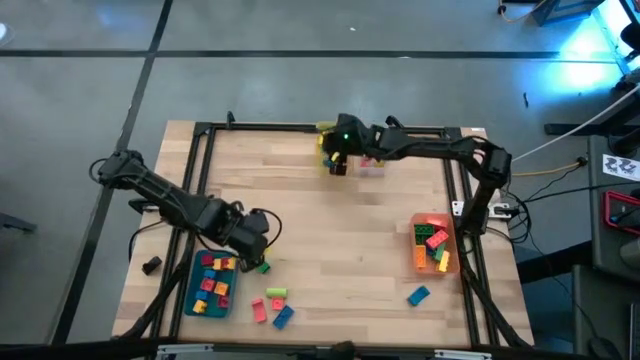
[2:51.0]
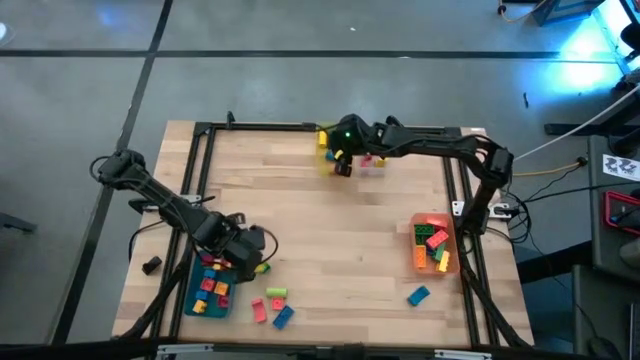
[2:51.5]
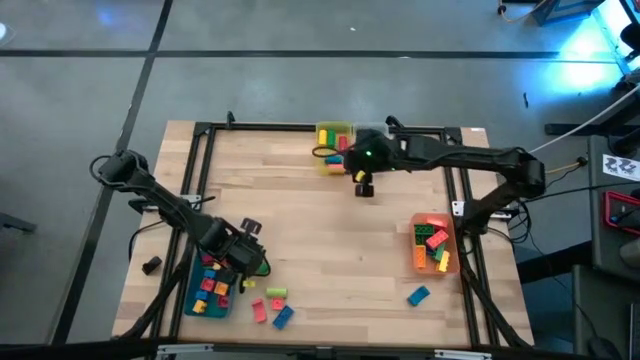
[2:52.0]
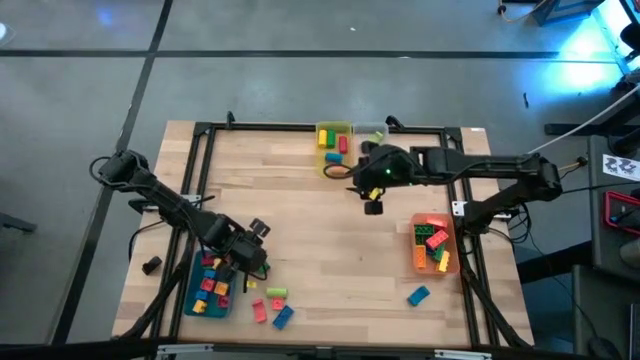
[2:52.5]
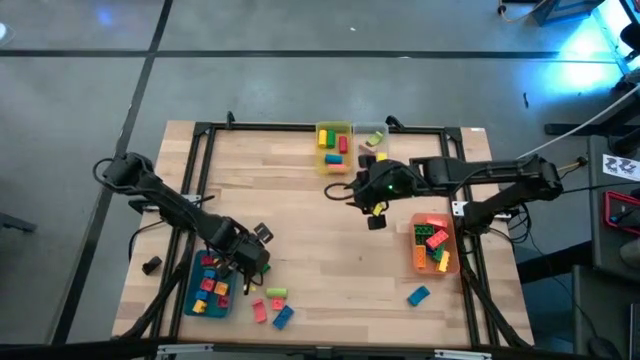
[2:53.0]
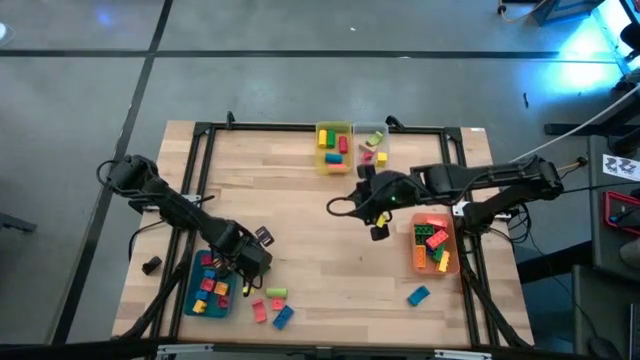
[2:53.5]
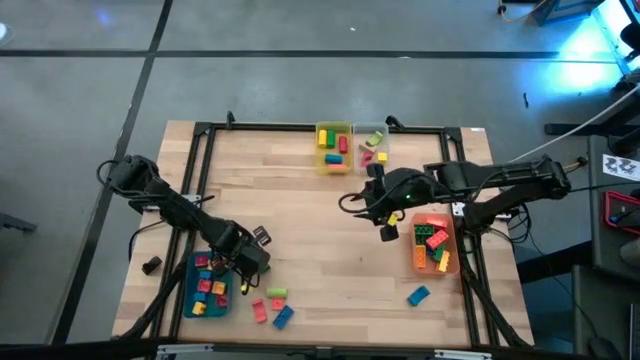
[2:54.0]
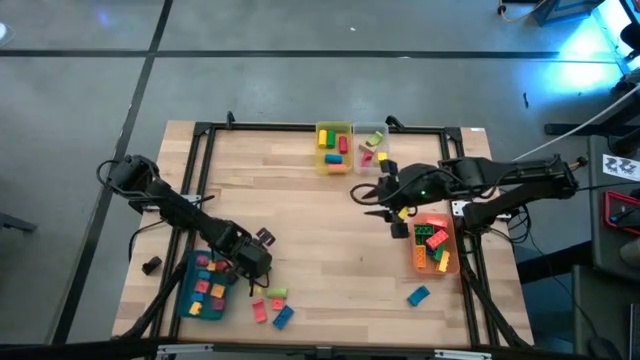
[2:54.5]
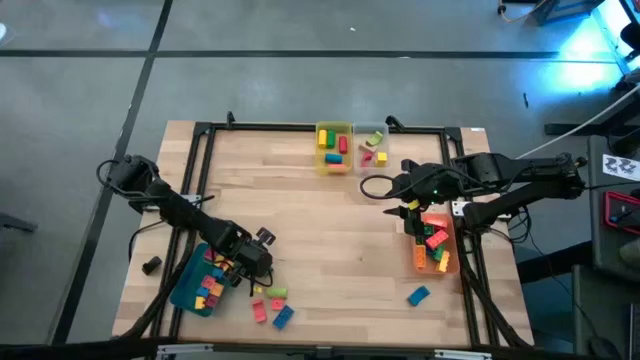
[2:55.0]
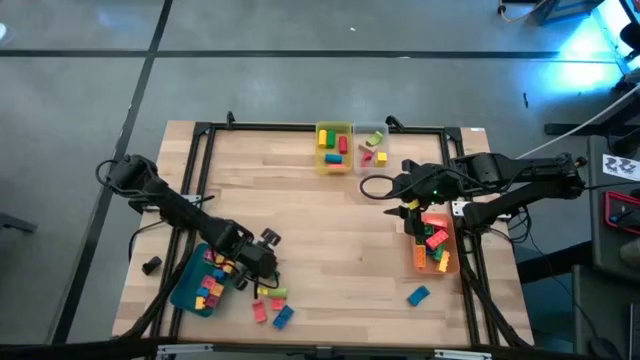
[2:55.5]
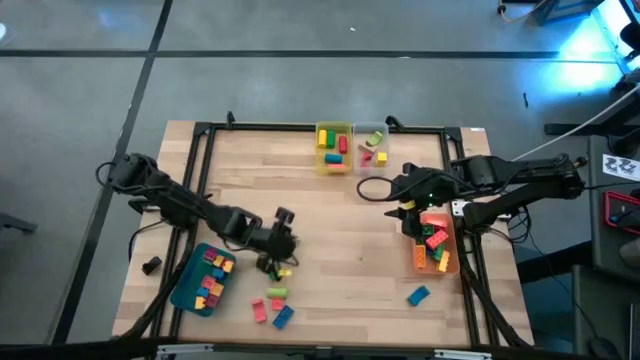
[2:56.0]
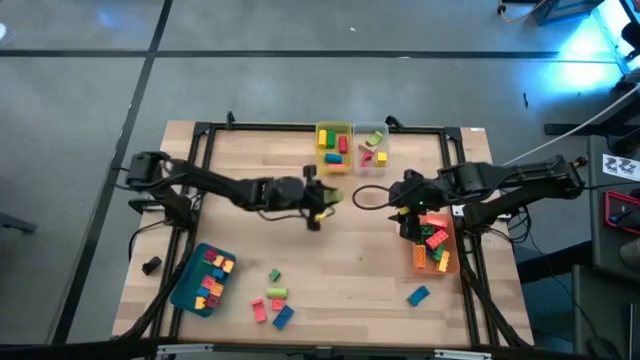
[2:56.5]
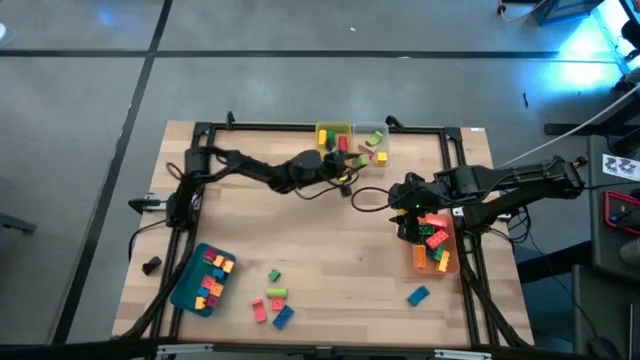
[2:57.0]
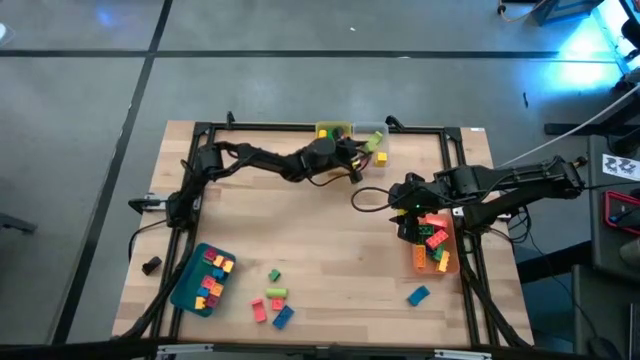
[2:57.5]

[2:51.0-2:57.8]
Task: Sort blocks by size
Put the light green block into the transparent bin

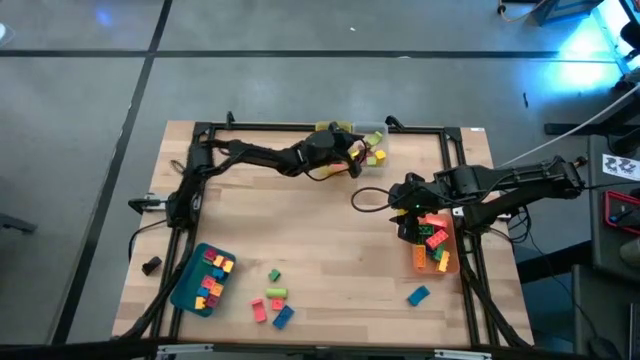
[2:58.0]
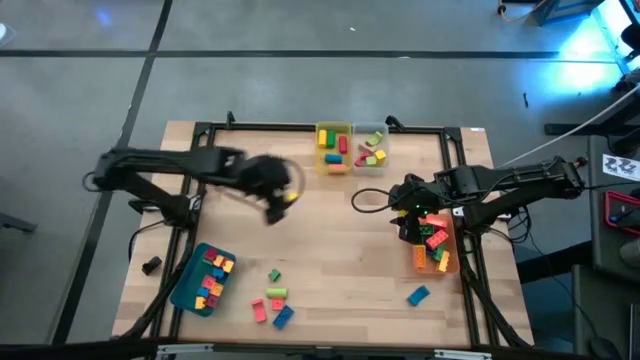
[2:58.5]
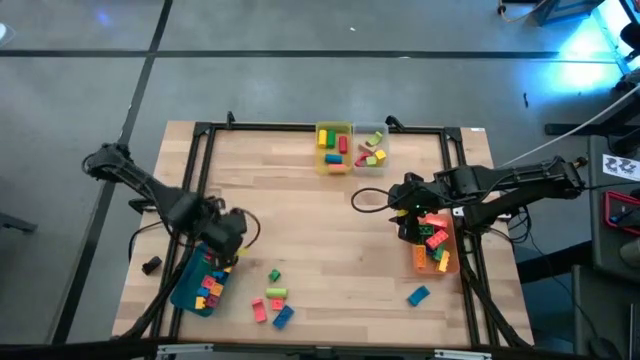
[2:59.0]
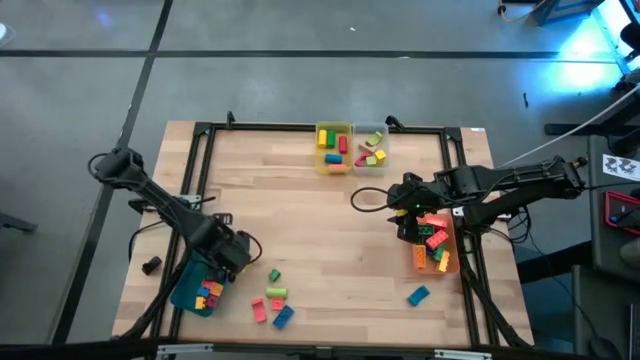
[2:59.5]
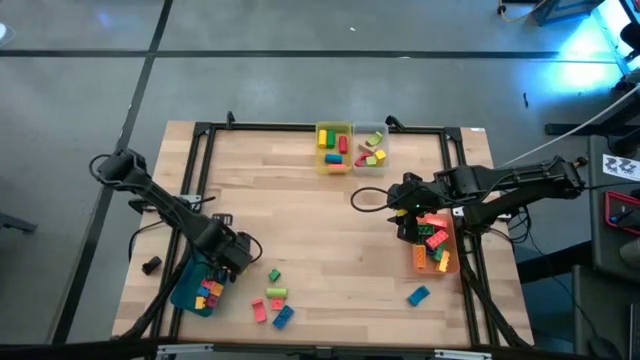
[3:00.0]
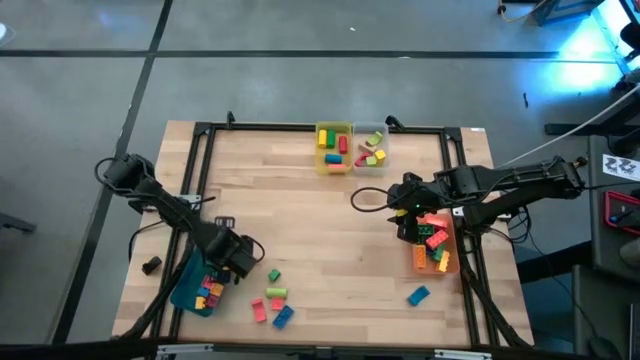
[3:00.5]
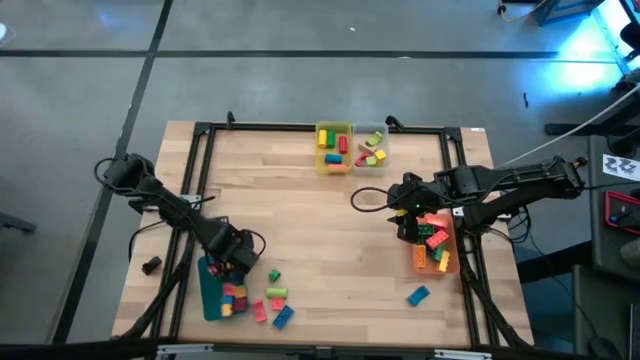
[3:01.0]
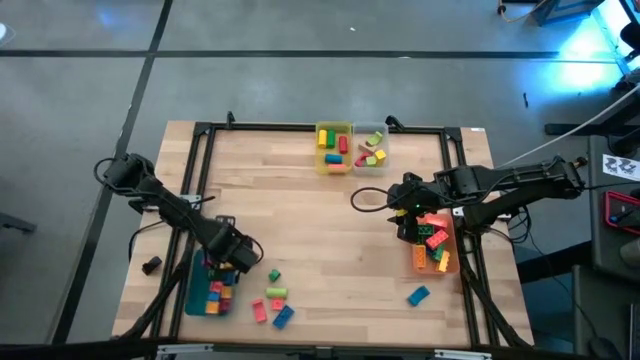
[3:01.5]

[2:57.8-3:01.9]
Adjust the blue bin

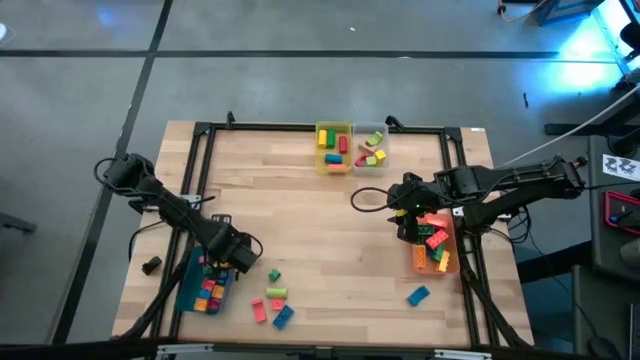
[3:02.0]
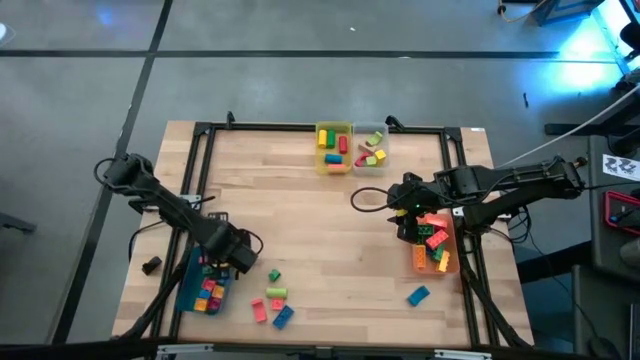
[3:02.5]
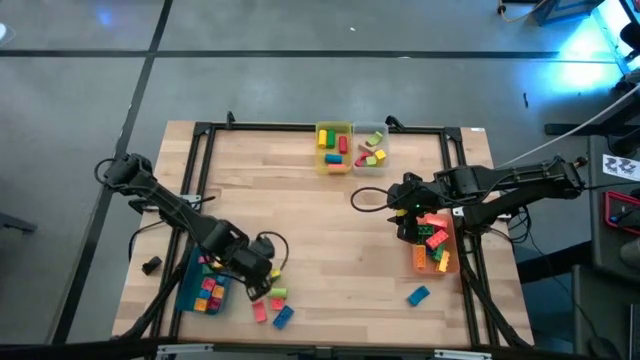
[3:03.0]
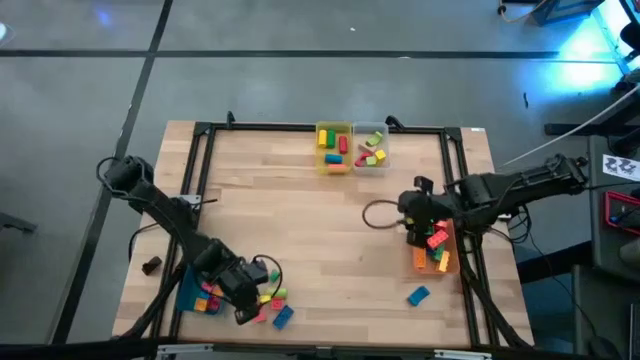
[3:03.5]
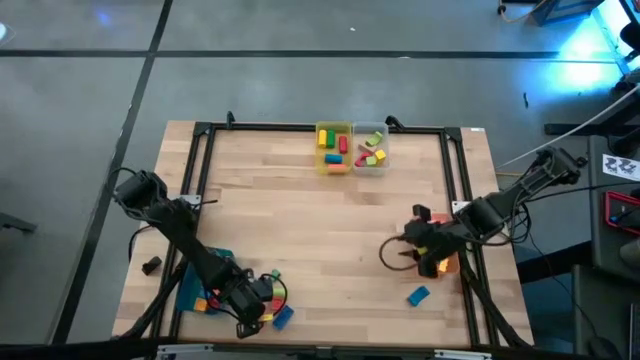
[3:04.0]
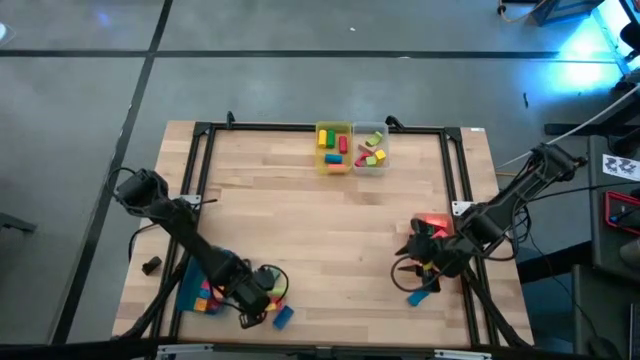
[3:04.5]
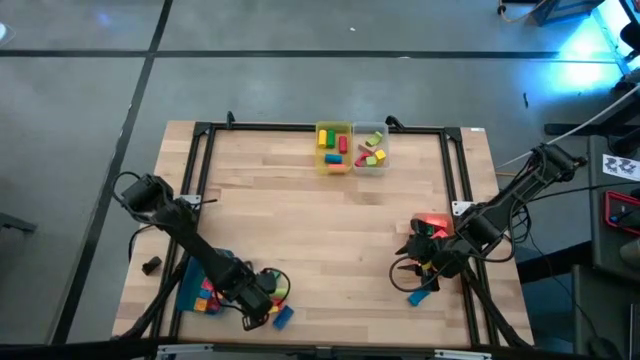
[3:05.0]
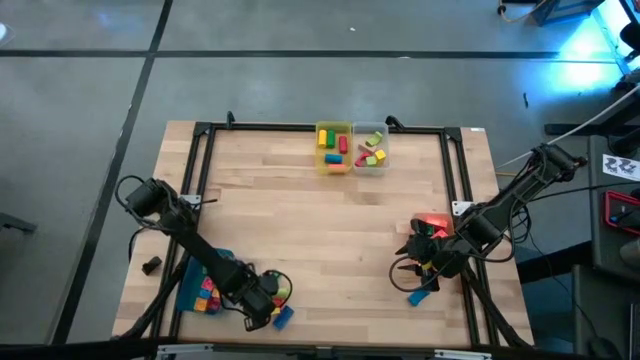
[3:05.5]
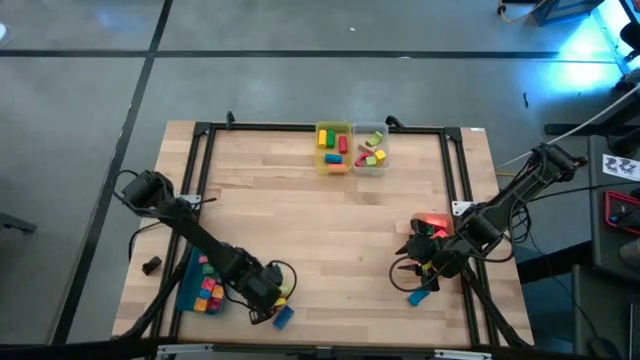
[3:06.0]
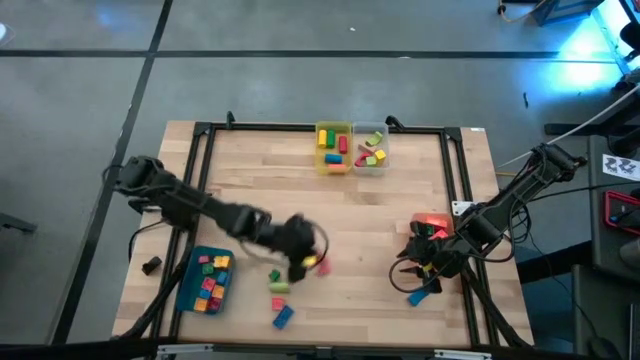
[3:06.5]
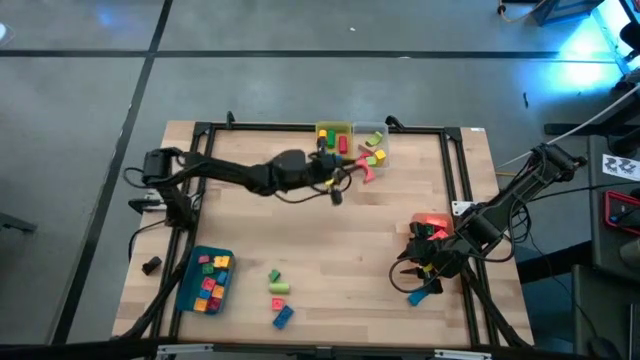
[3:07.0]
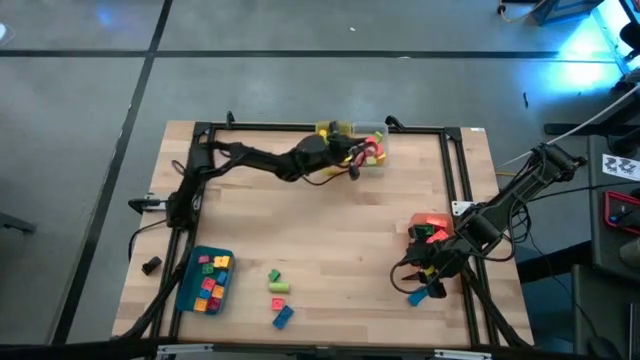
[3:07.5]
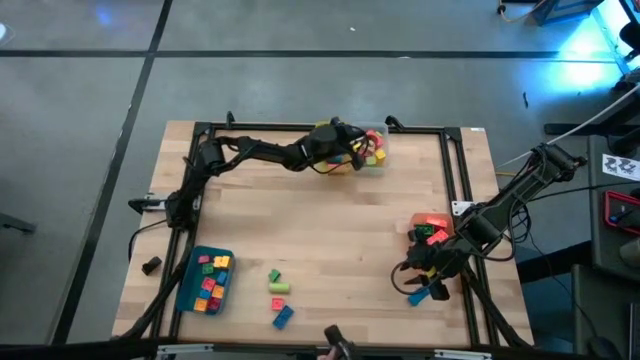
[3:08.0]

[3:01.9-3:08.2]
Put the orange half circle block into the transparent bin

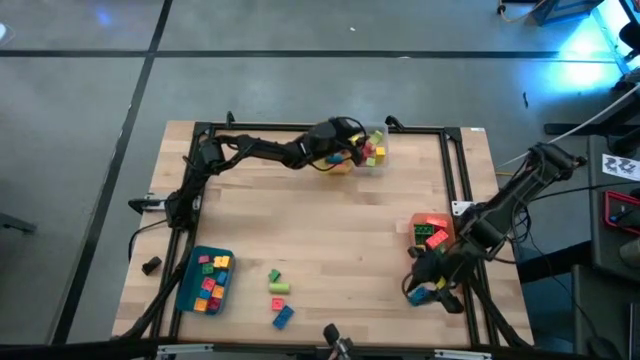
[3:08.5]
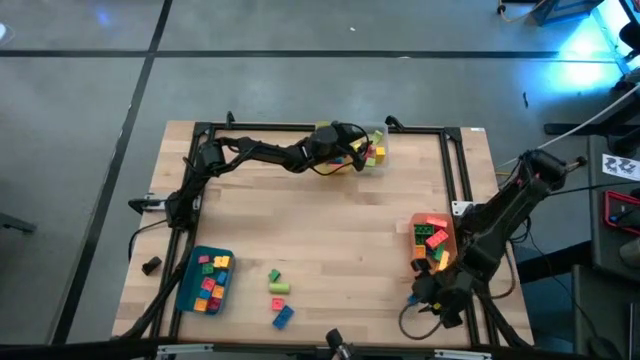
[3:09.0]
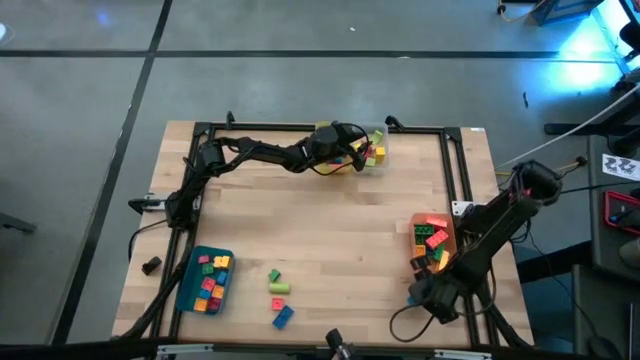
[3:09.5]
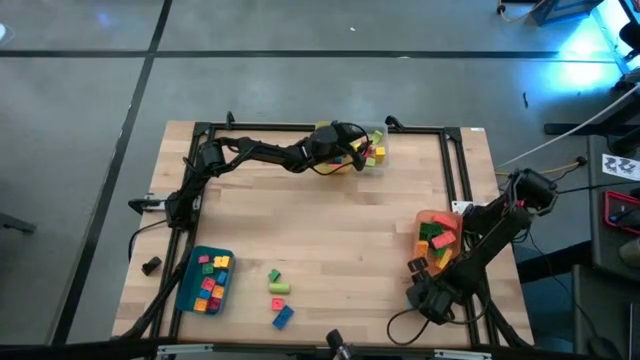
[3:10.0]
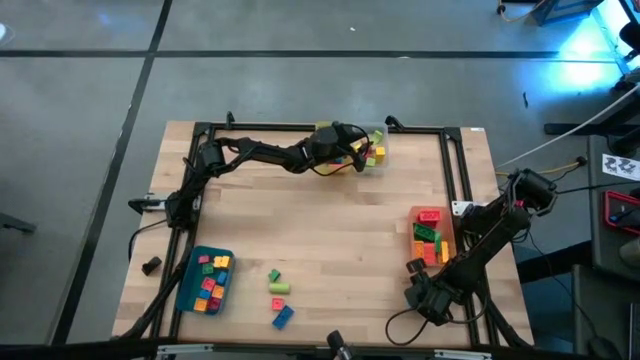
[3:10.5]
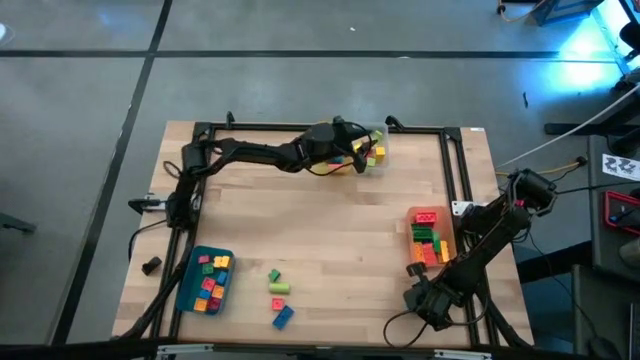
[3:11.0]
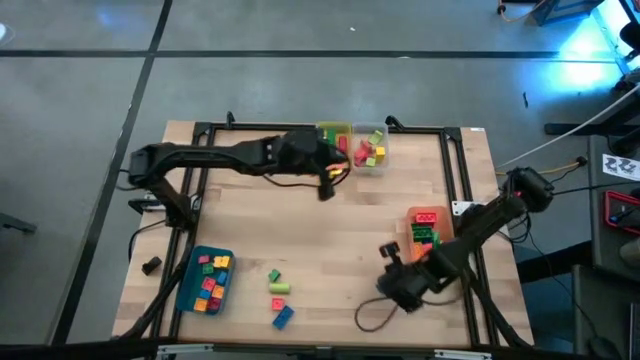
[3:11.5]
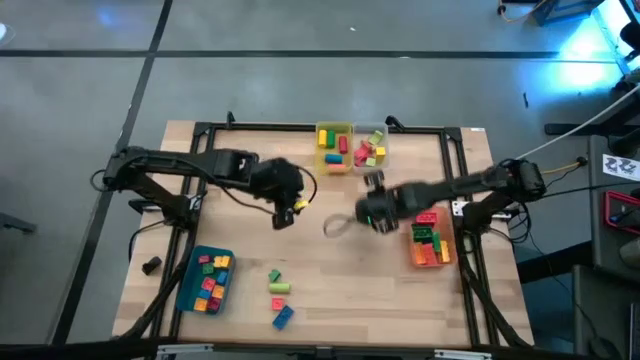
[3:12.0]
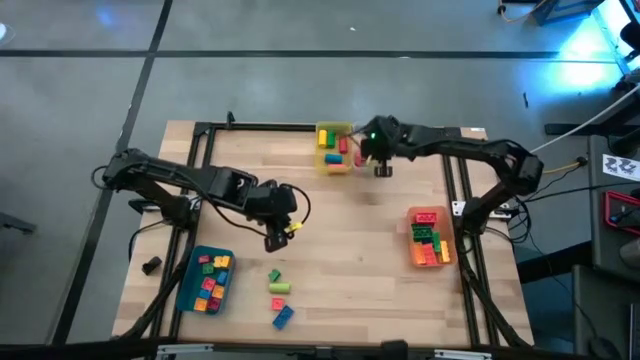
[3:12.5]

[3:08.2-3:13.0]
Put the blue half circle block into the transparent bin
